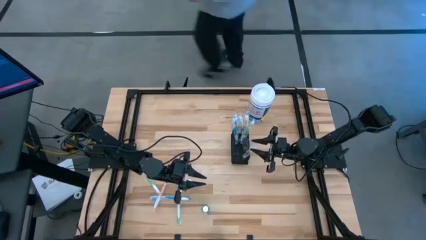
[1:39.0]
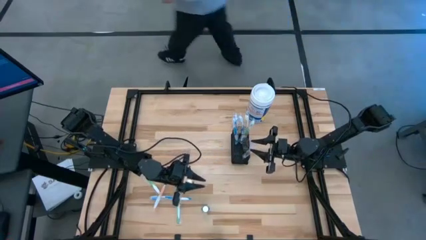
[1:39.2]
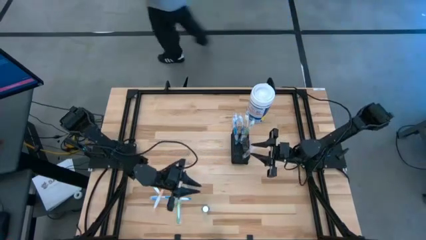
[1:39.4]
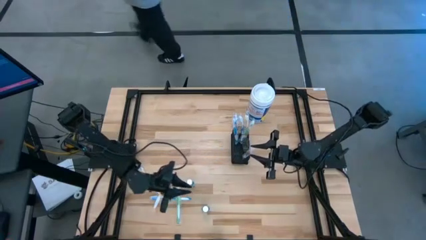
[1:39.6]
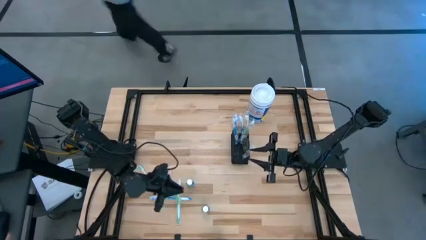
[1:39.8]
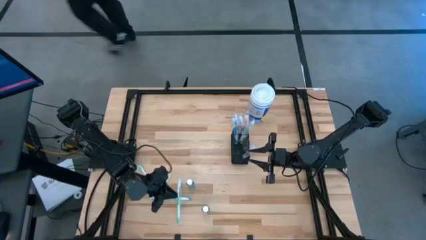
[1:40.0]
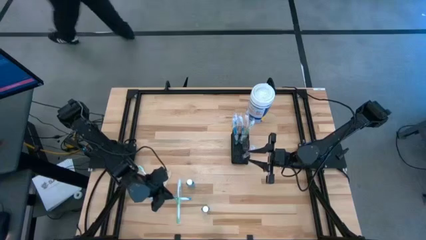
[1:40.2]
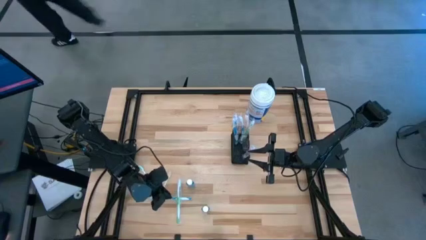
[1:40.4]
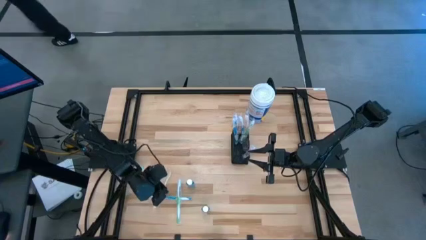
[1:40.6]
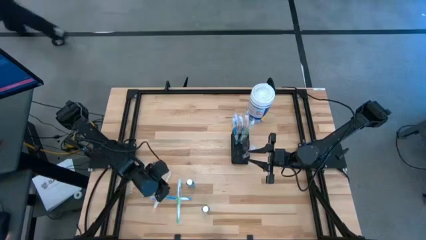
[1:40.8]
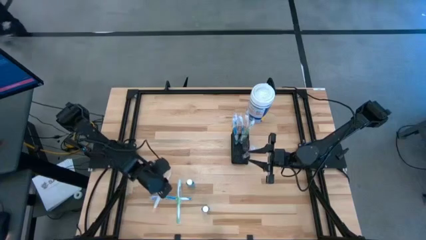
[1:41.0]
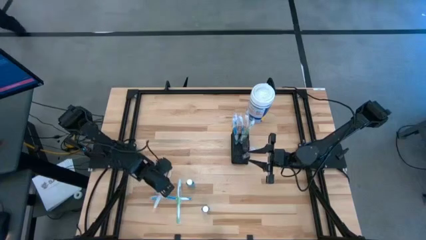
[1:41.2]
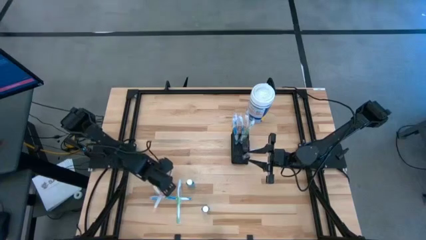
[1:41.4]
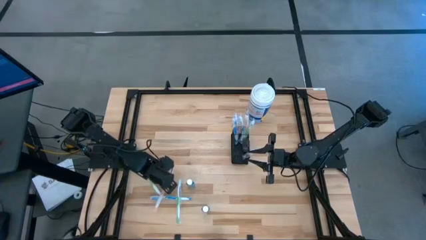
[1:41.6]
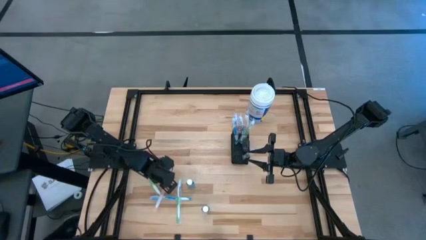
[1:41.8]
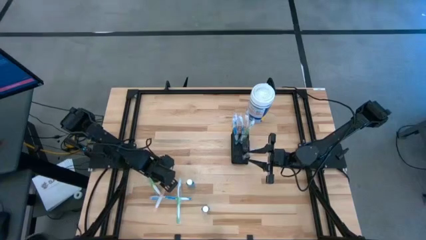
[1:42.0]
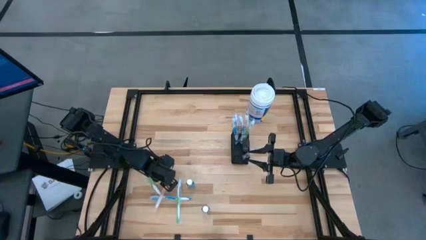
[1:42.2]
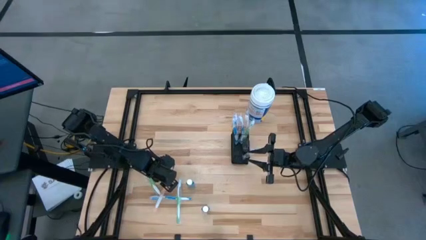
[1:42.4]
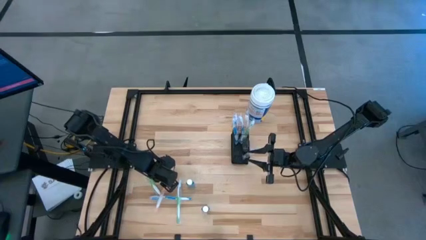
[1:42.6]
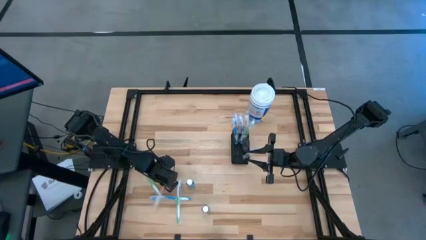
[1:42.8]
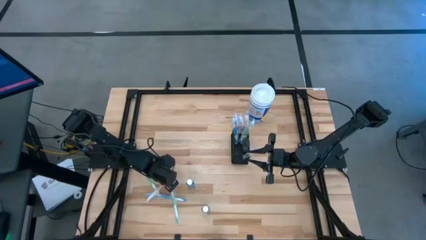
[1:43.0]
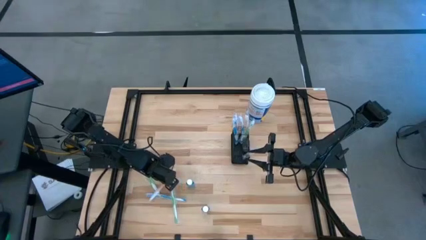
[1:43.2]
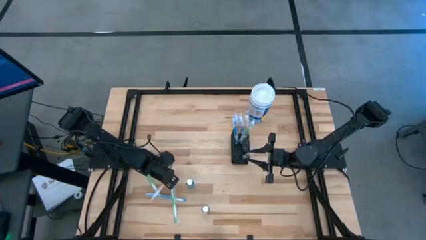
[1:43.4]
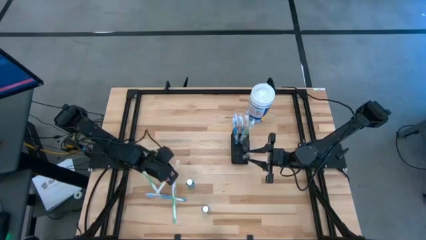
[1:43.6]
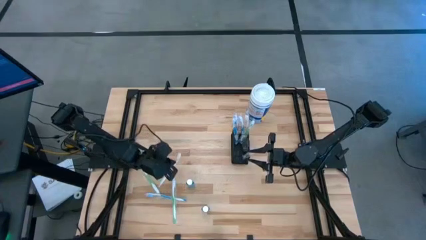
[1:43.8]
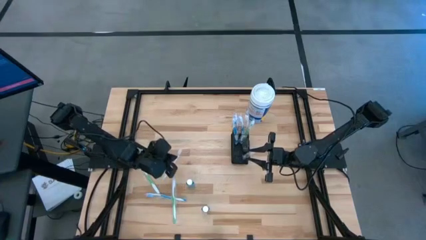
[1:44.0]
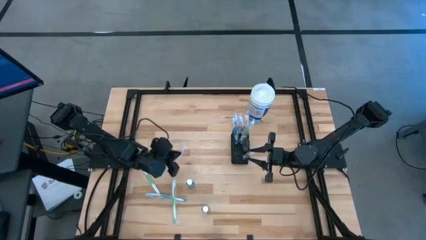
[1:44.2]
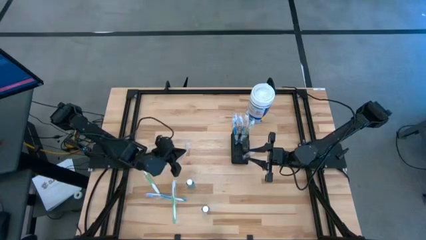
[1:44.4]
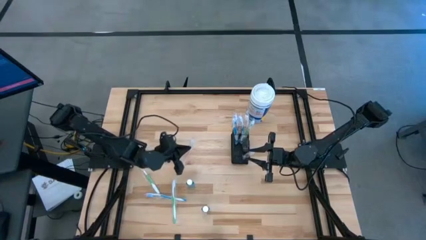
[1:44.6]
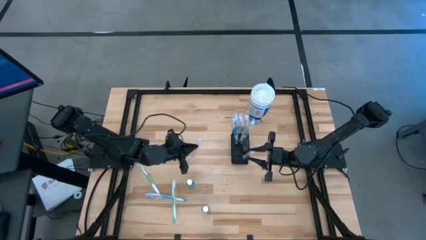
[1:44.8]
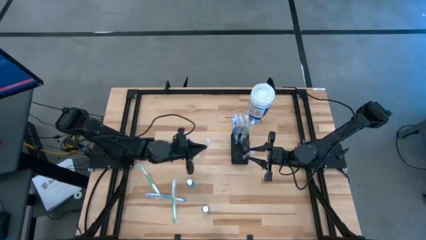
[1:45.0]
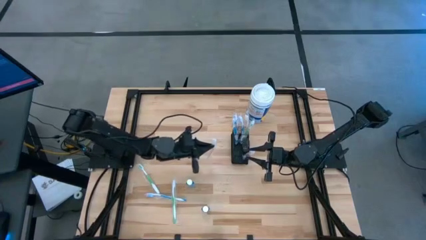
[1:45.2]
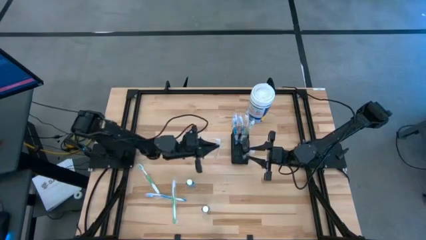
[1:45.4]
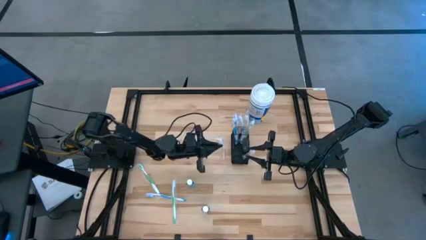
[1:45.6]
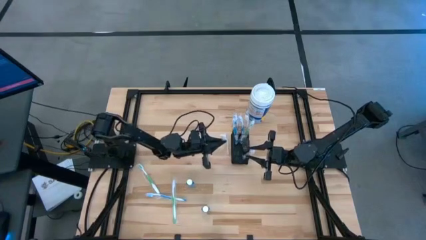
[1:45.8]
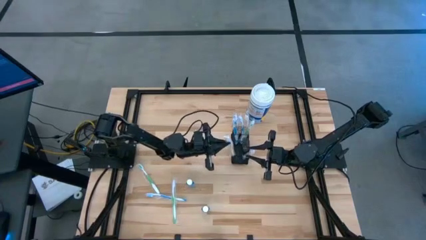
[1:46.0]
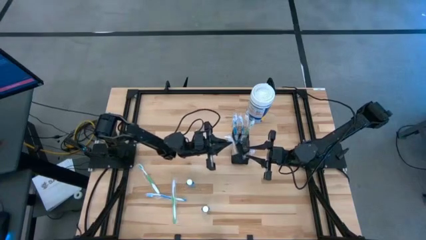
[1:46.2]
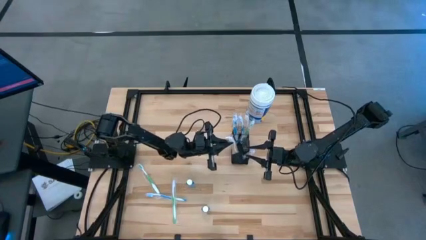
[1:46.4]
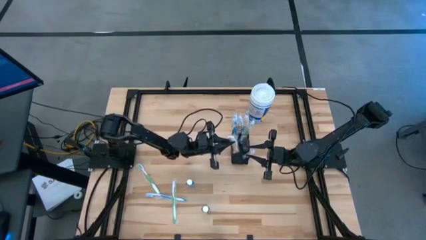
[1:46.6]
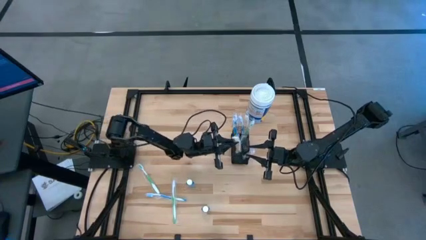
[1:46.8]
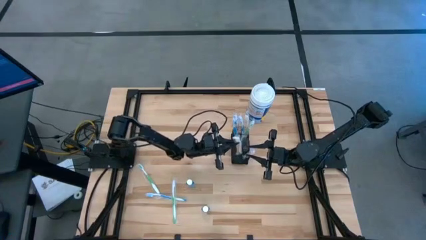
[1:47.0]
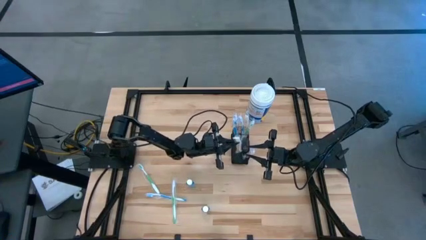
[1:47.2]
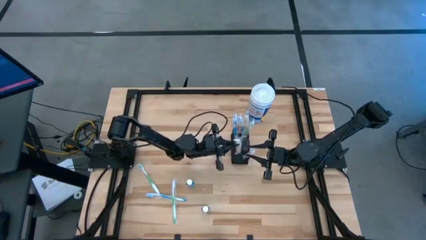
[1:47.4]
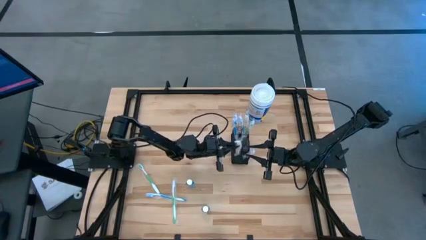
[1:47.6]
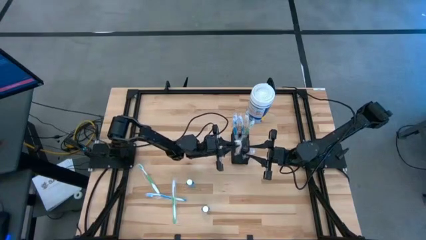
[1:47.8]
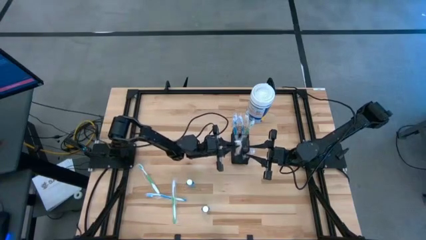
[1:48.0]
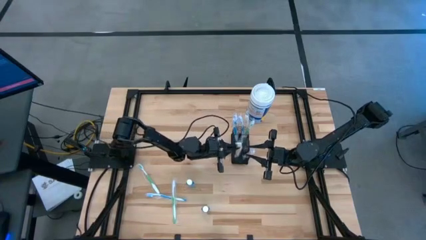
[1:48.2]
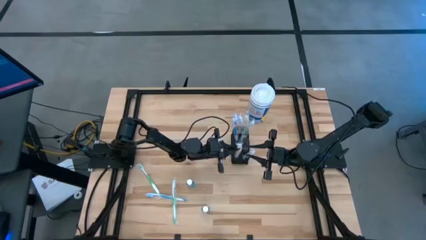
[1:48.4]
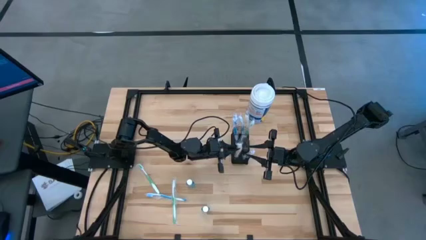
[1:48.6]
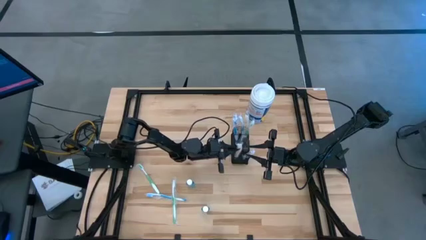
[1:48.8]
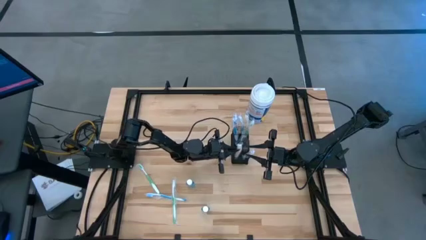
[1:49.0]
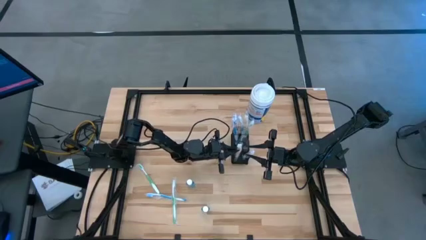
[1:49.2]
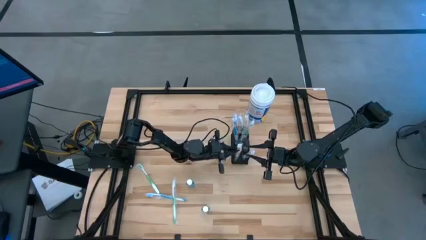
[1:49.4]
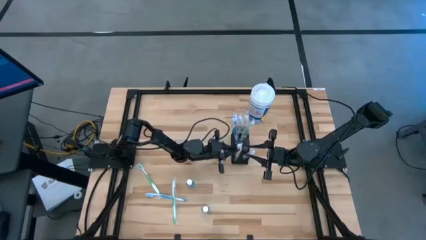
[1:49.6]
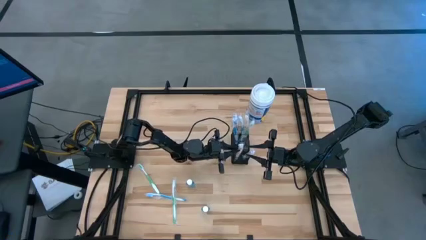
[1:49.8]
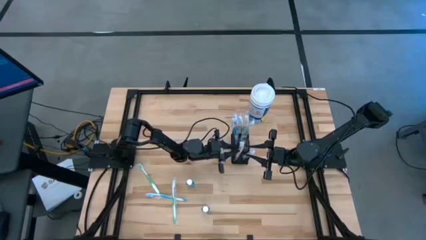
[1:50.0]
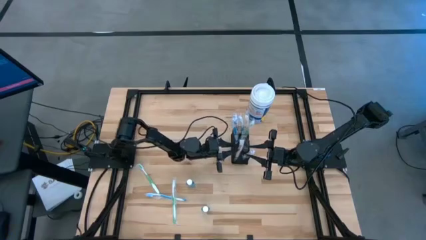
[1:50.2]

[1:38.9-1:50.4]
Task: Pick & Place toothbrushing station
Put the orange toothbrush into the wire mesh organizer

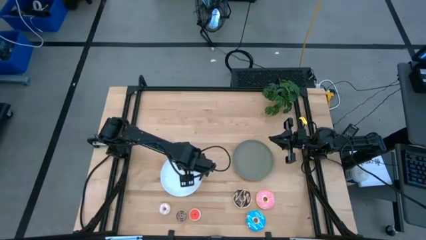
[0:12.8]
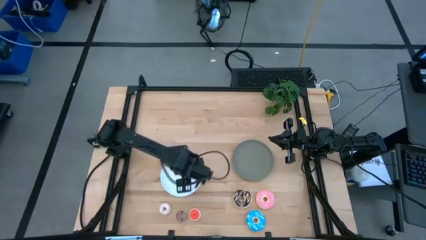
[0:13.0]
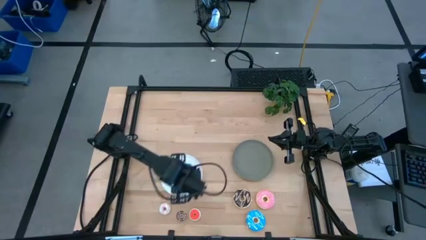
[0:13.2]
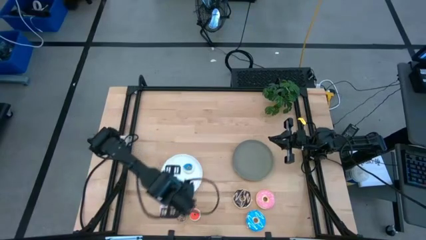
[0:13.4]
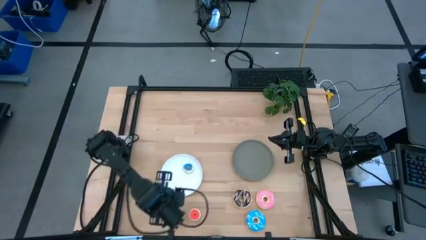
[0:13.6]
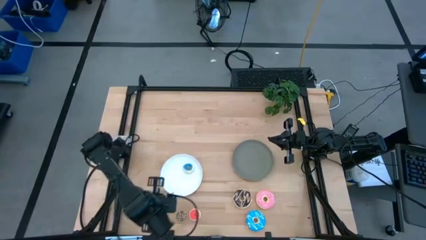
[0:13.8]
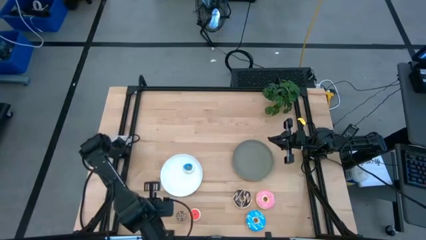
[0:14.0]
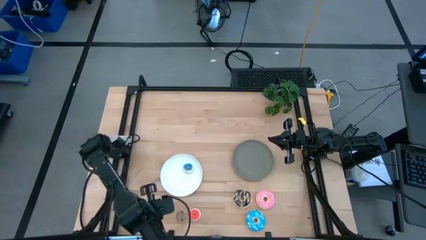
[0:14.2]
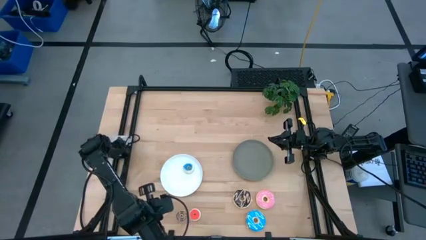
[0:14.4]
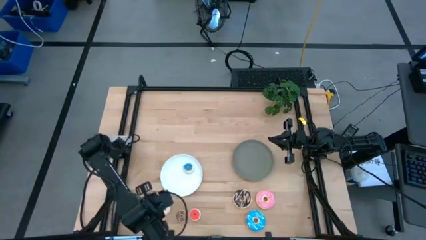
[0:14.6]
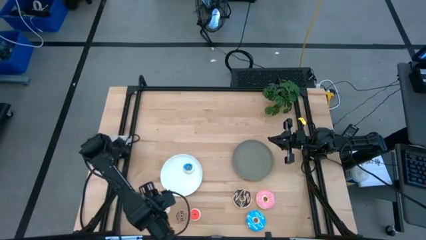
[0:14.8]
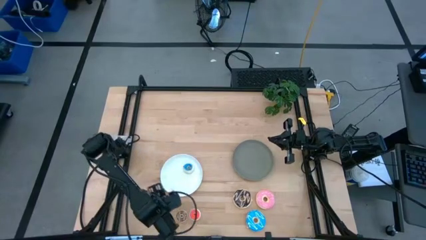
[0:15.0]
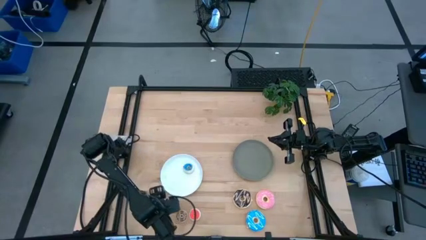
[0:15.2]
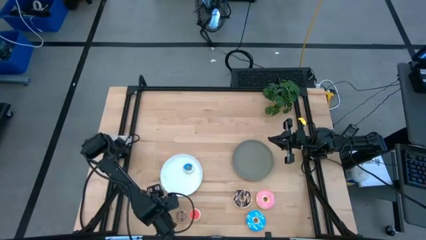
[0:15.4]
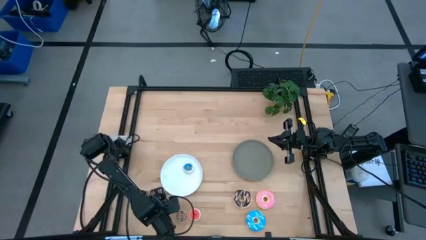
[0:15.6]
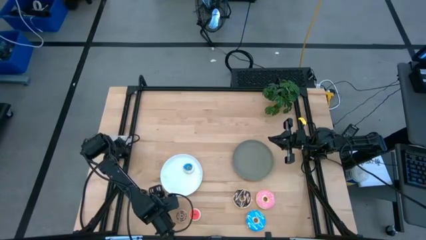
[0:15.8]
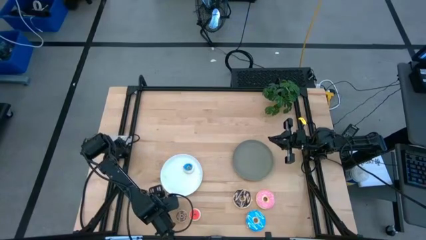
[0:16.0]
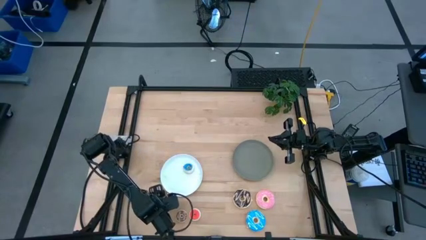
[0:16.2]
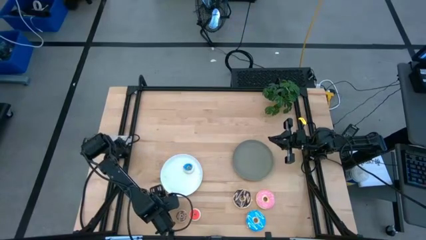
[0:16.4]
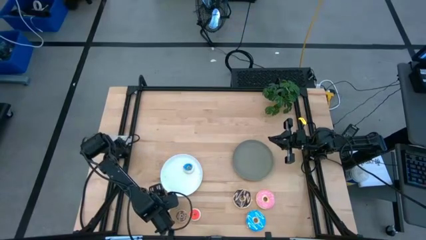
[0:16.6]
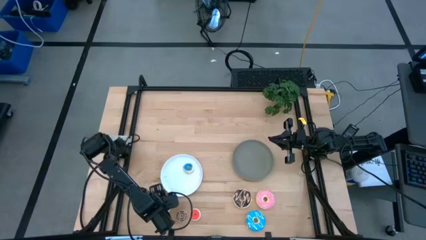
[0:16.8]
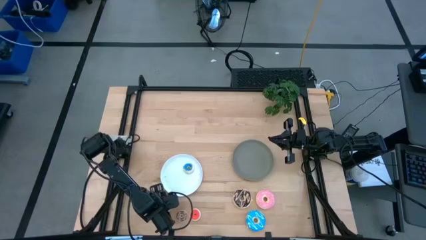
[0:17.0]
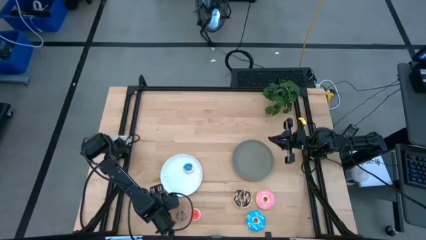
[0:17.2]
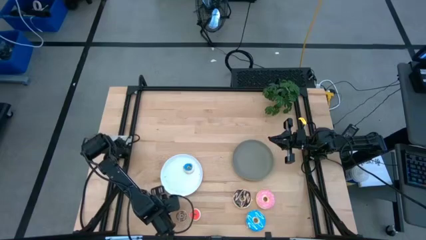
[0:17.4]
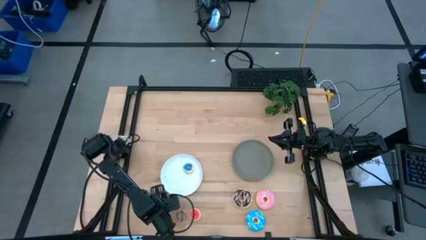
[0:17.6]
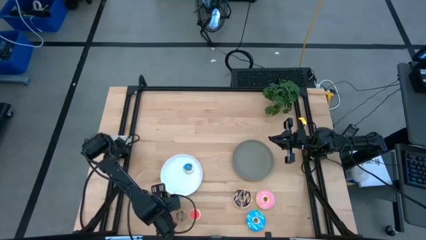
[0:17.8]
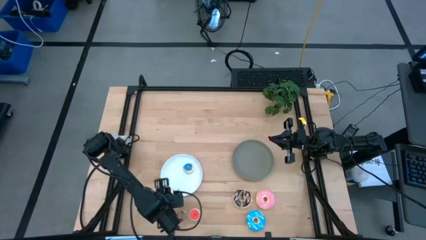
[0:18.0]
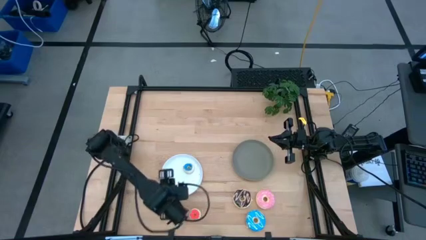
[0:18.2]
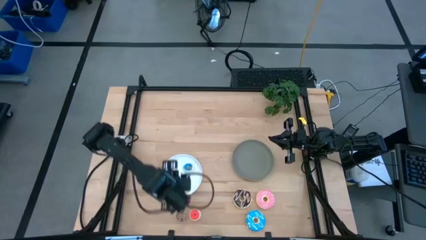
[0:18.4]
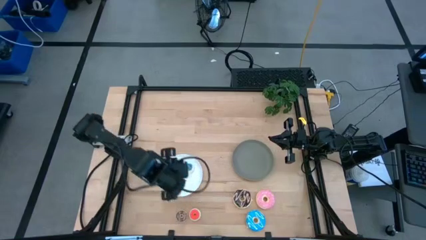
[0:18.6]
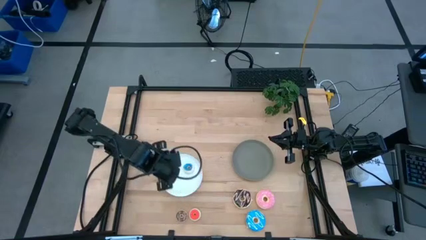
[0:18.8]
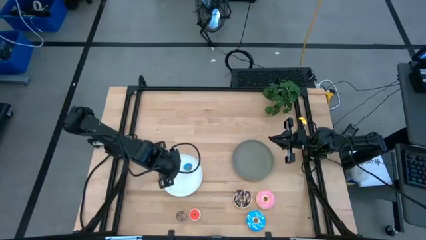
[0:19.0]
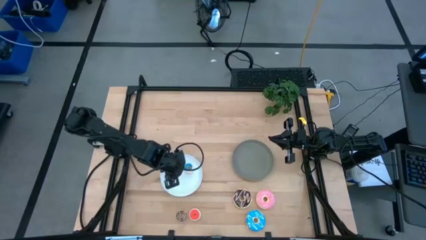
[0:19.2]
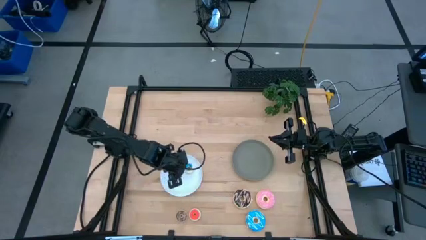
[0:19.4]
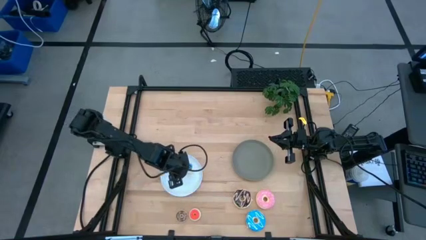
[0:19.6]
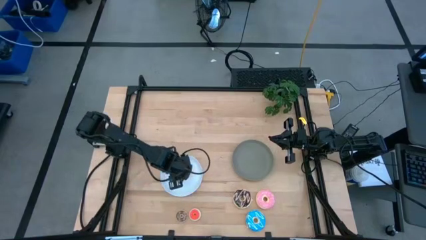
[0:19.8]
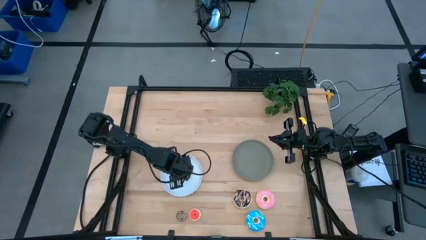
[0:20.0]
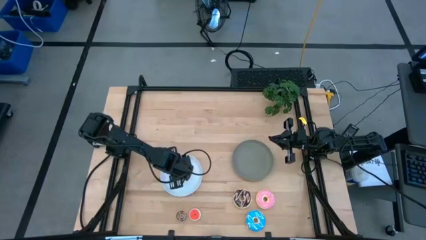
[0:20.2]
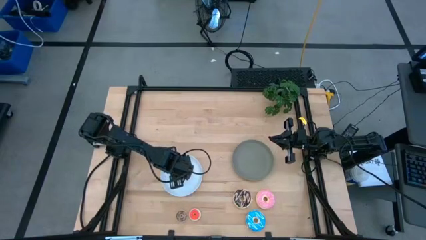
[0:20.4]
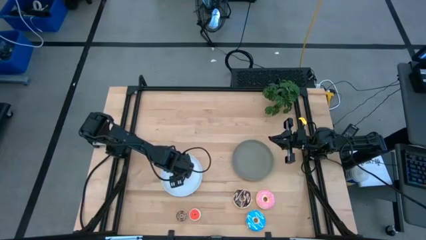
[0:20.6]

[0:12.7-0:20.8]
Task: Pick & Place donuts
Put the small white donut on the white plate
